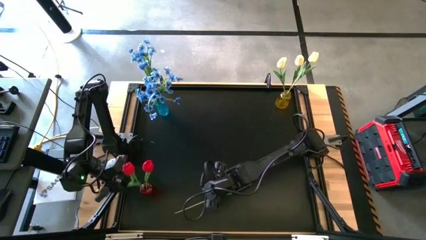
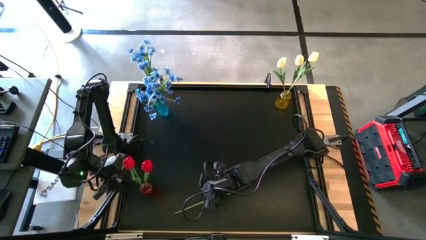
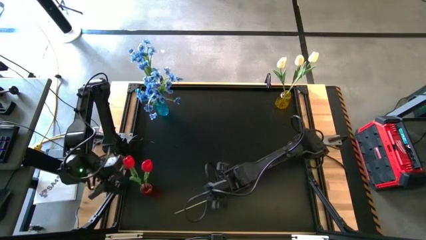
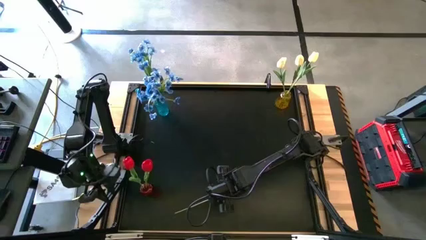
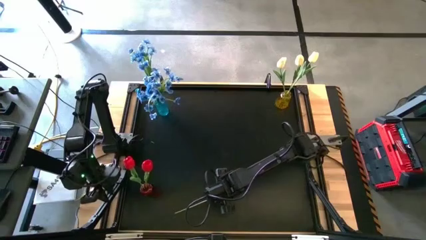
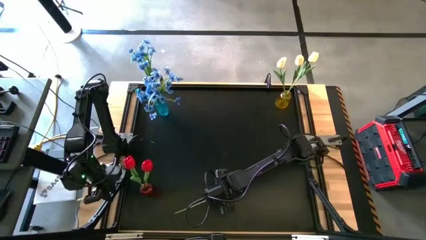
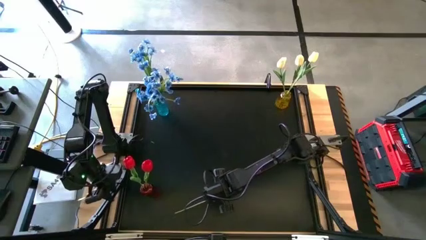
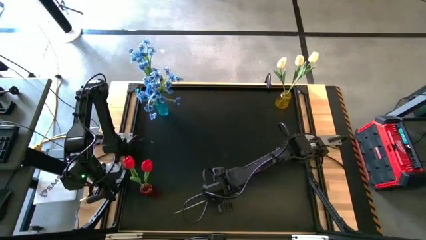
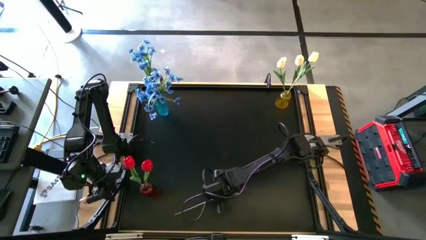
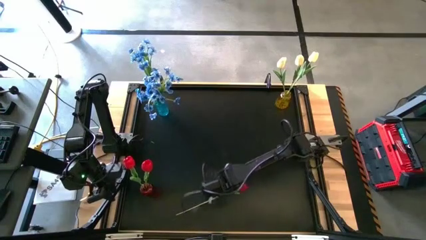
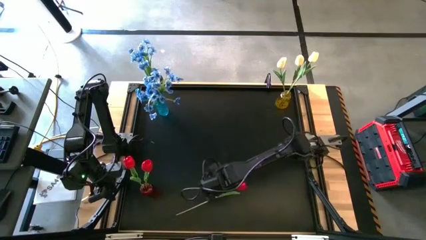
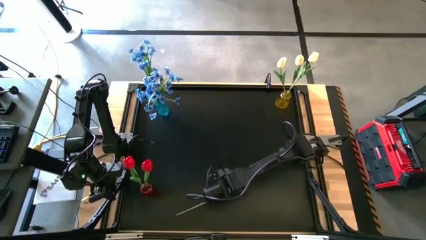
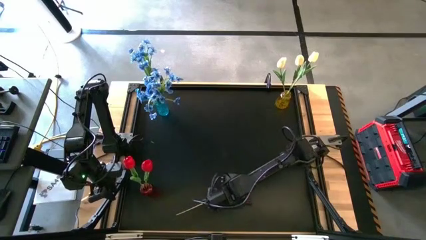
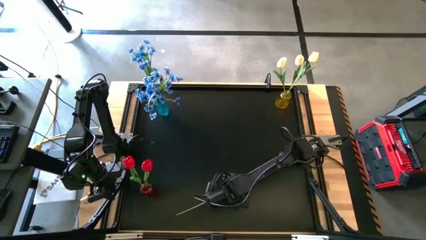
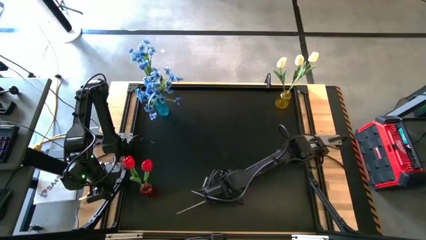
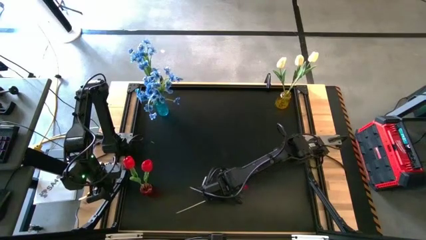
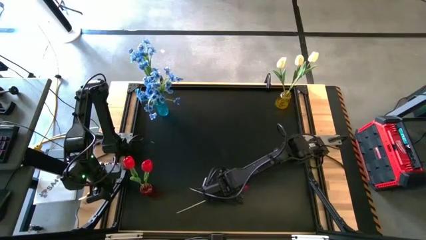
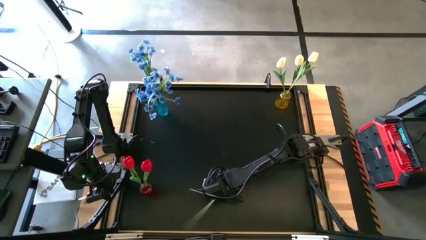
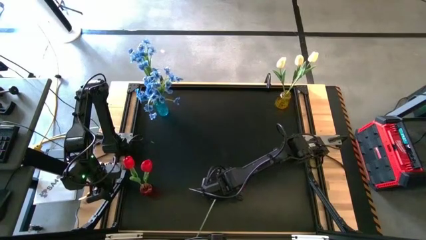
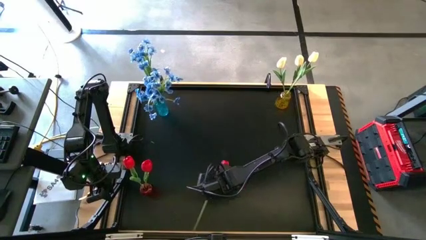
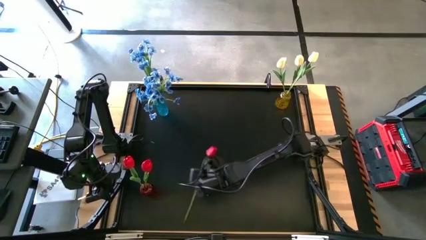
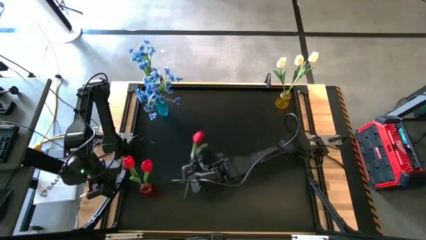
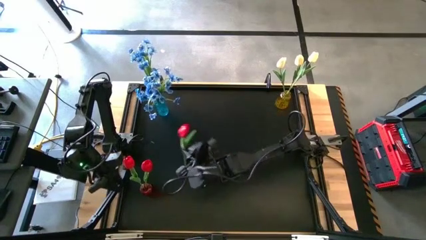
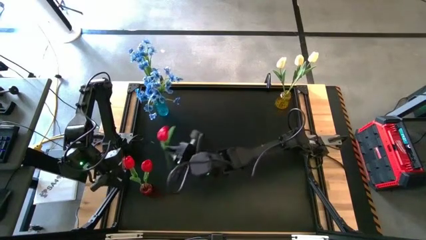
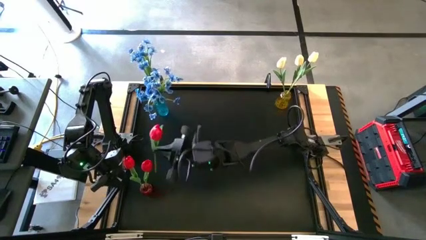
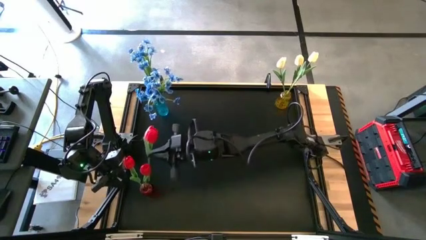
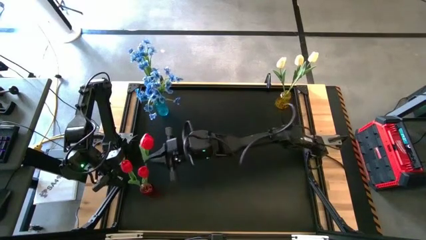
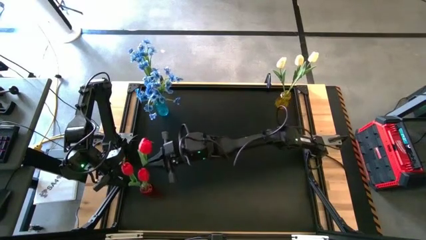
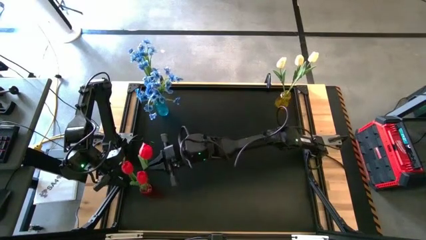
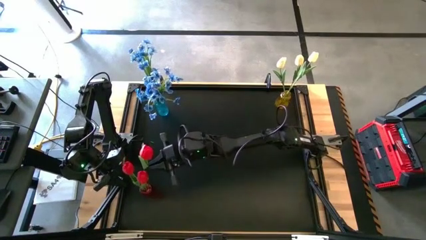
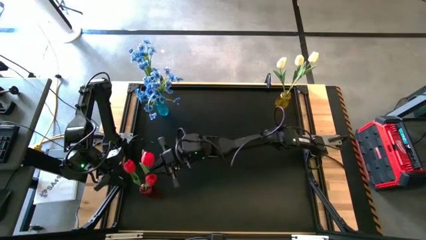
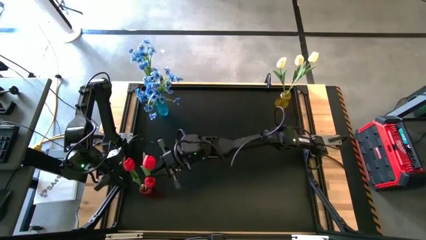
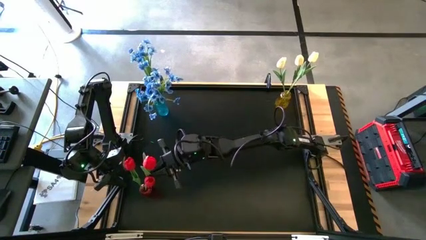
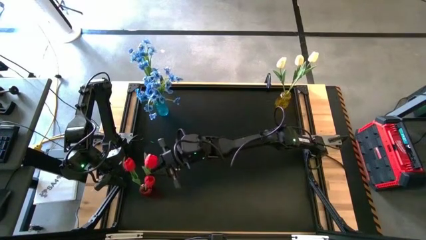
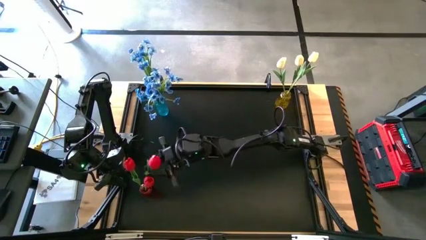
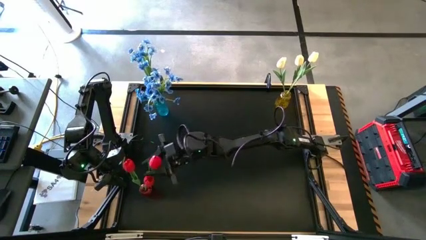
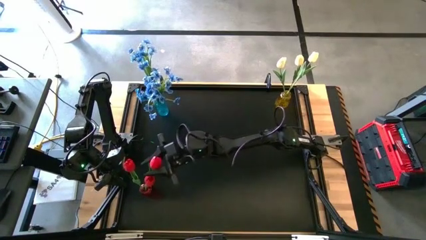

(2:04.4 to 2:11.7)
Task: Sort flowers into vase by color
Put the red flower into the red vase

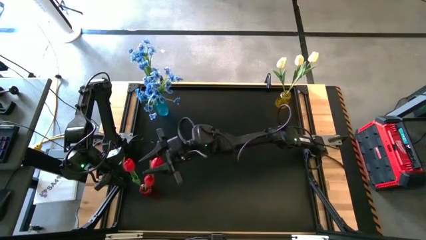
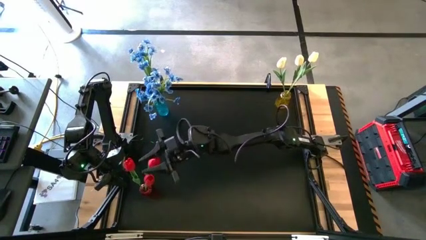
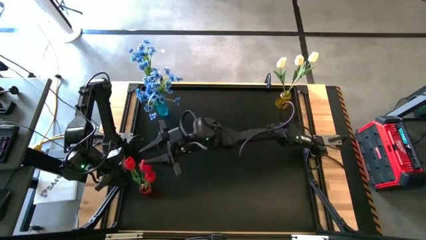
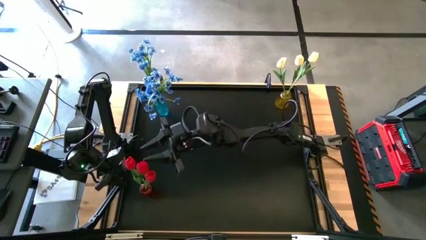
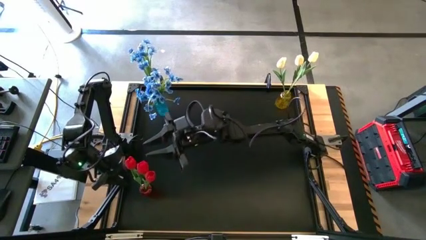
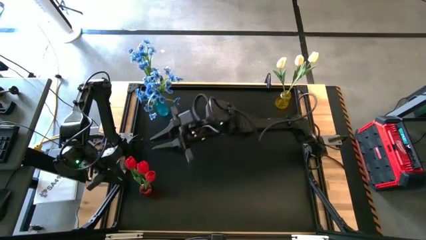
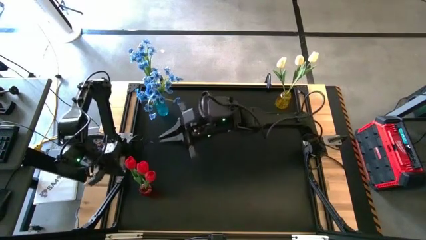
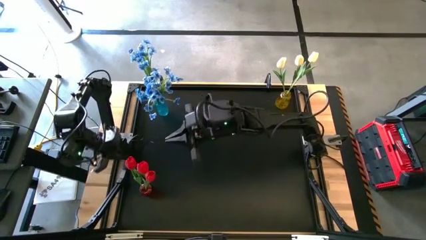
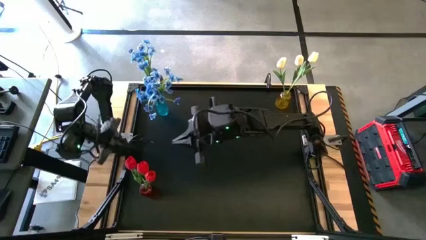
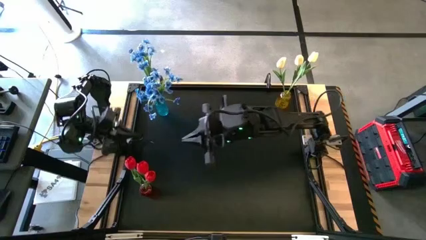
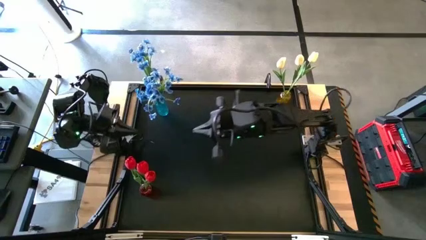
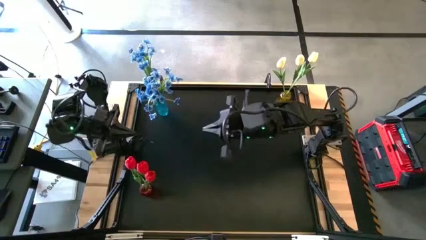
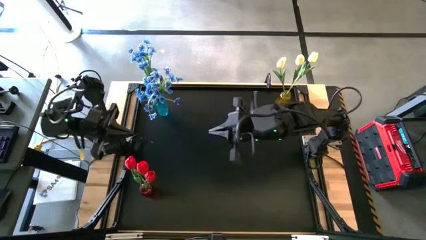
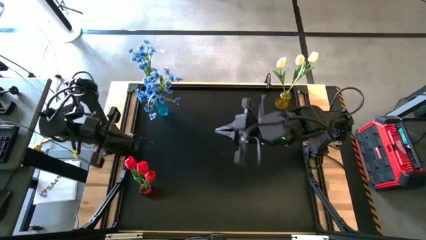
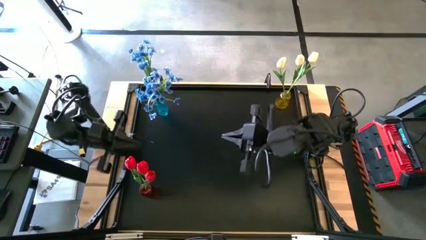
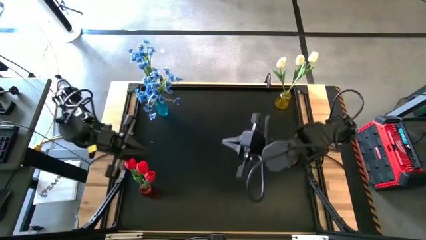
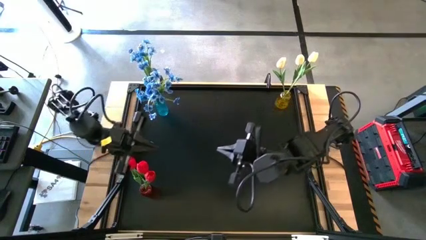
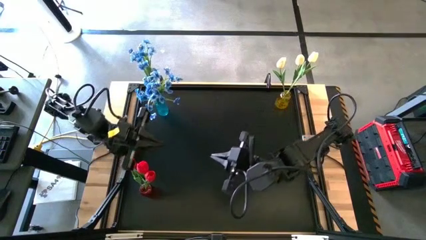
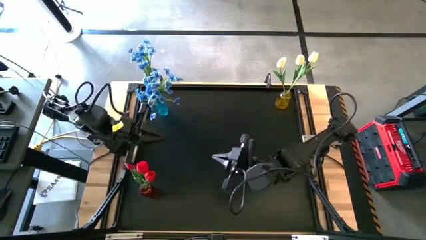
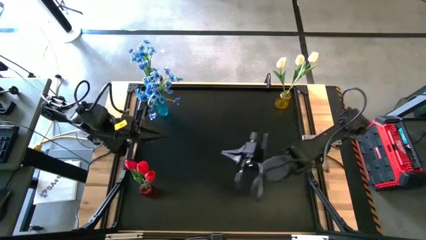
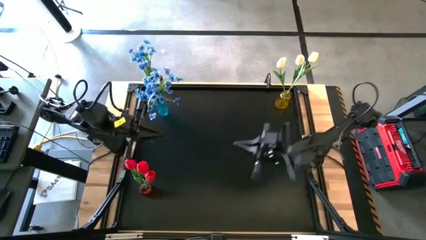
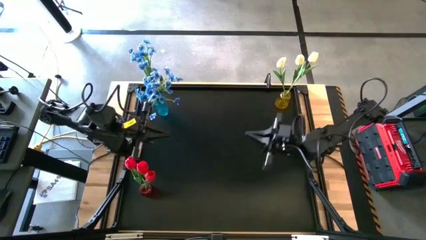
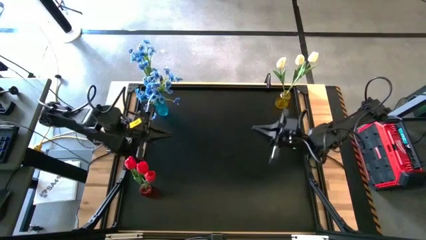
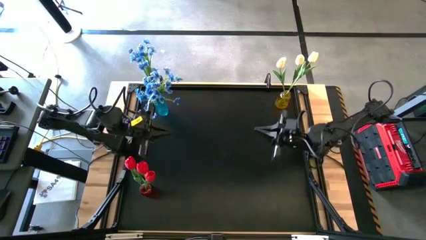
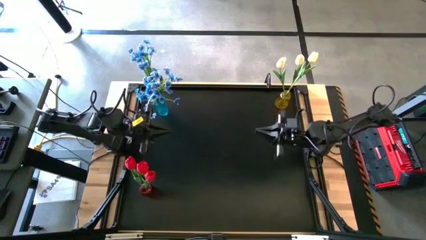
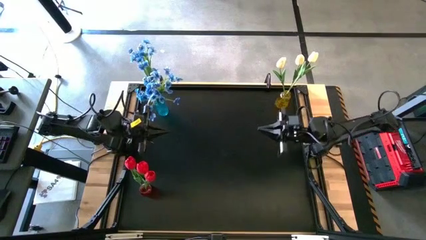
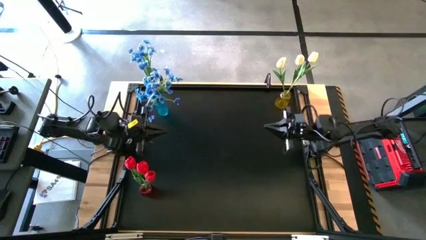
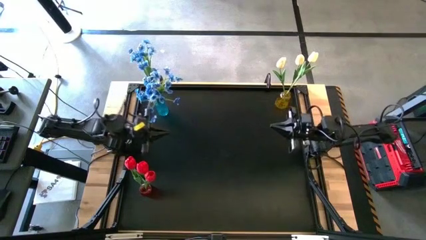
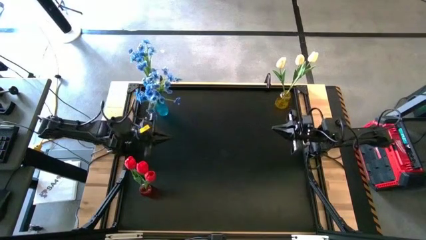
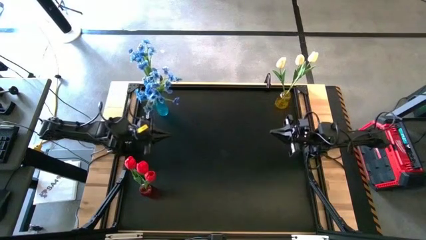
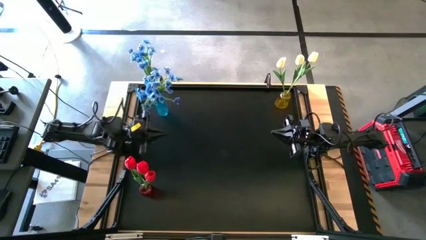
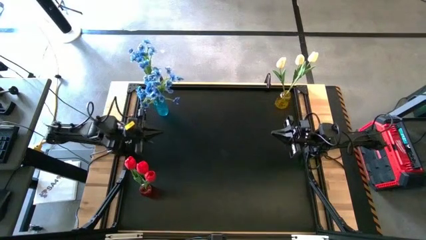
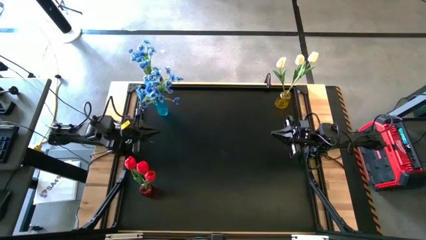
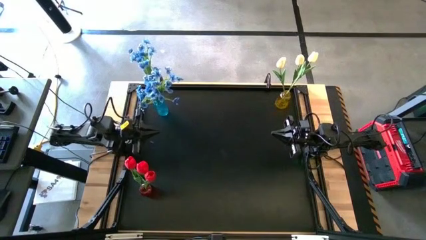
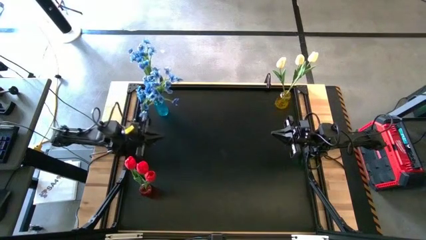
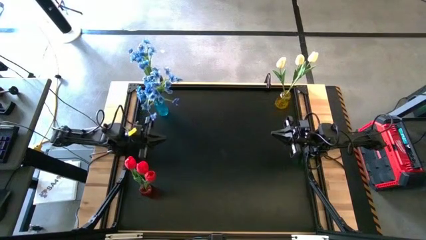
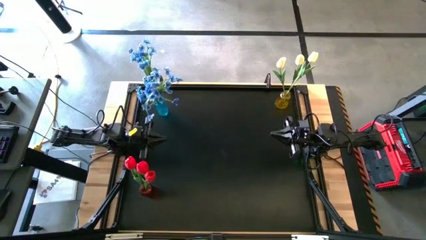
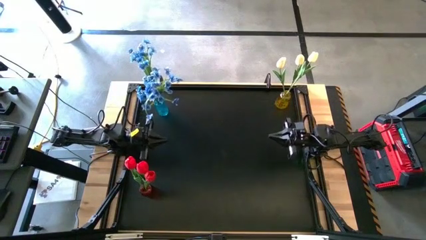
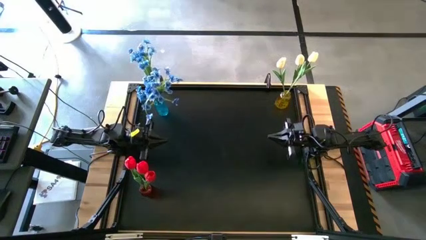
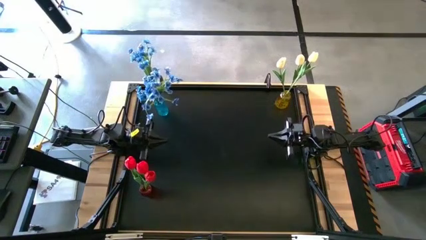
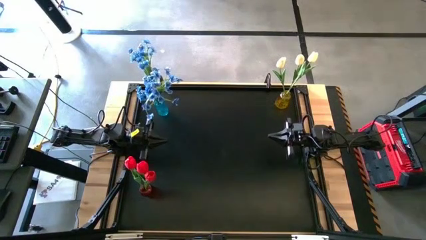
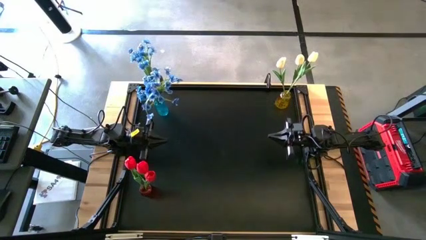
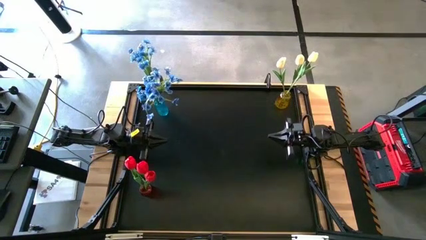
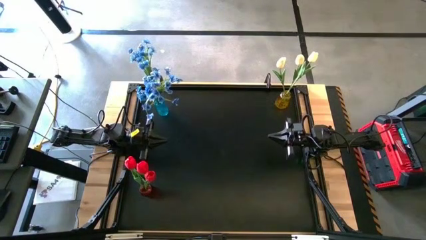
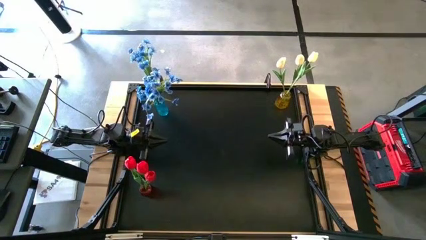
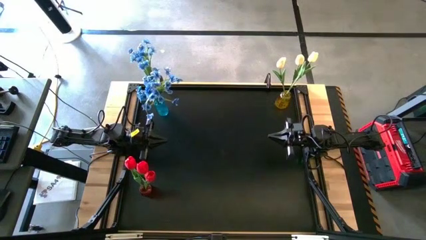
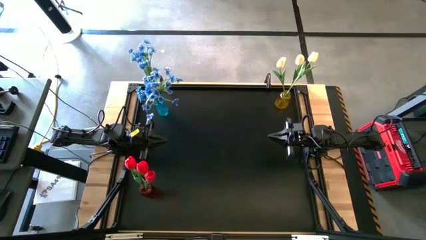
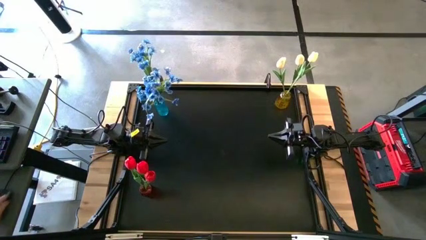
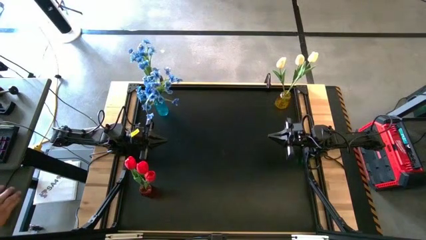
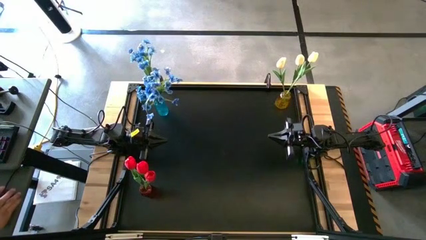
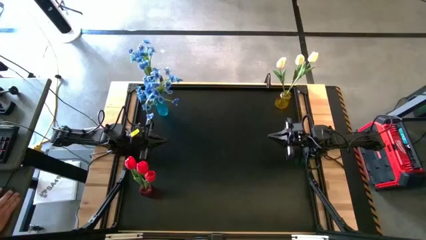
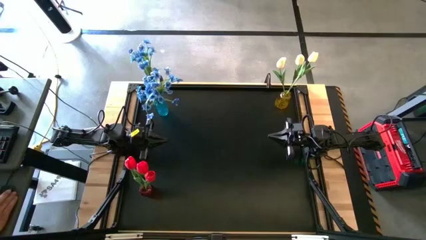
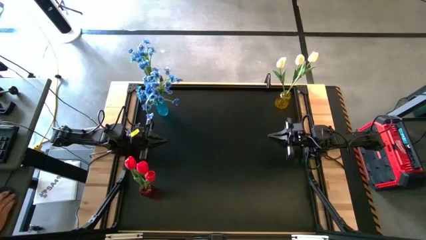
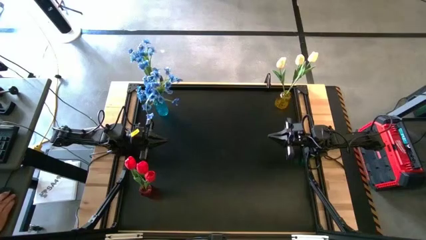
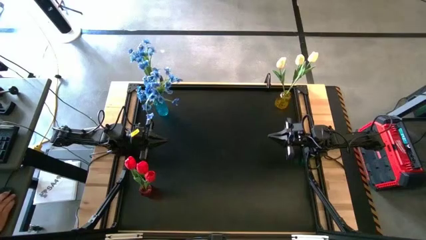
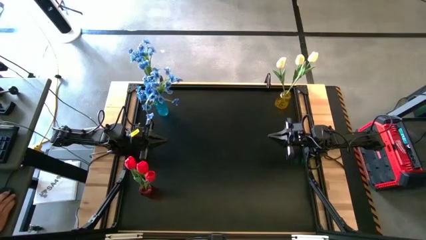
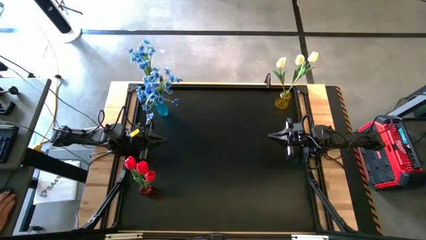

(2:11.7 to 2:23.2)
Return to Home Position
